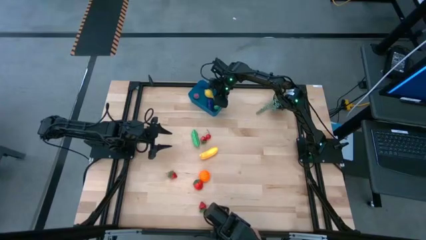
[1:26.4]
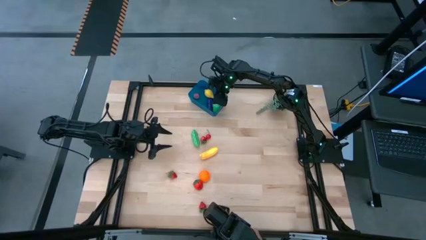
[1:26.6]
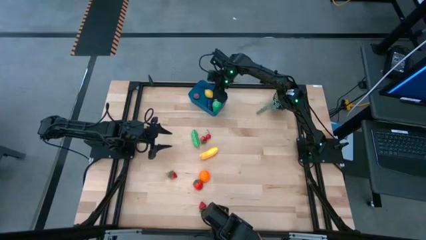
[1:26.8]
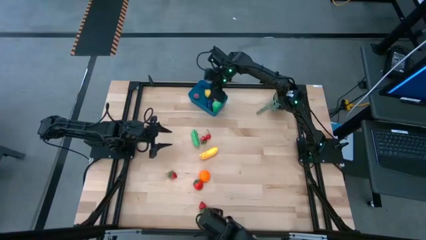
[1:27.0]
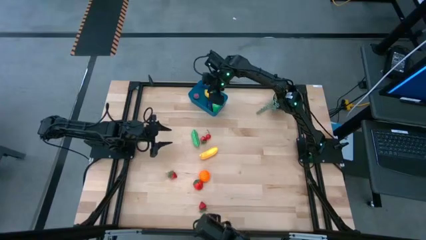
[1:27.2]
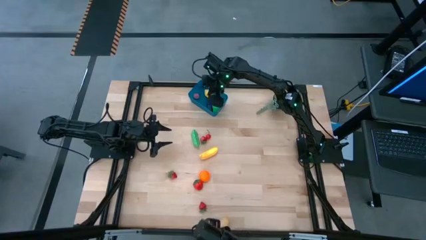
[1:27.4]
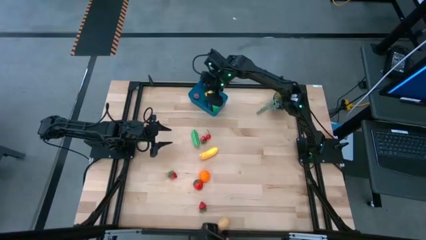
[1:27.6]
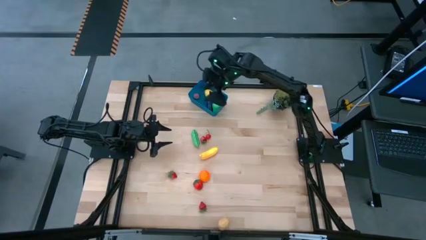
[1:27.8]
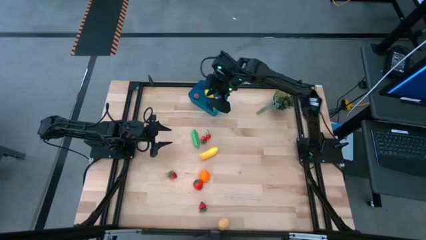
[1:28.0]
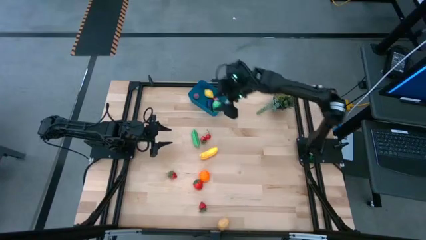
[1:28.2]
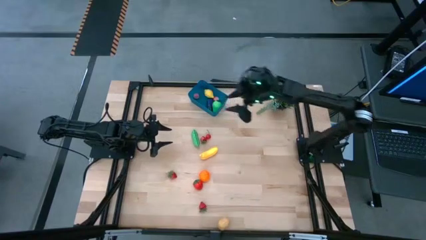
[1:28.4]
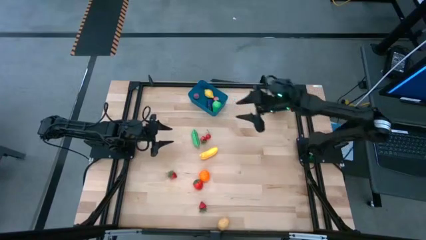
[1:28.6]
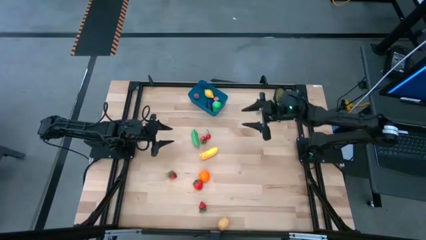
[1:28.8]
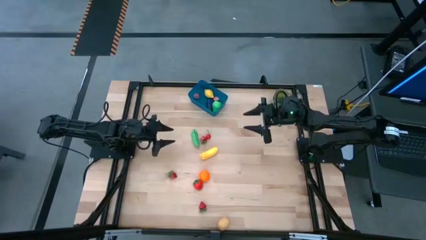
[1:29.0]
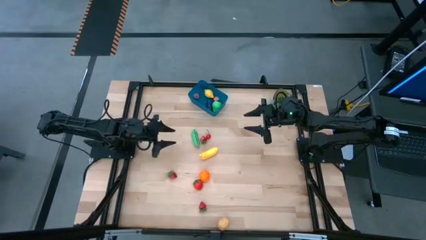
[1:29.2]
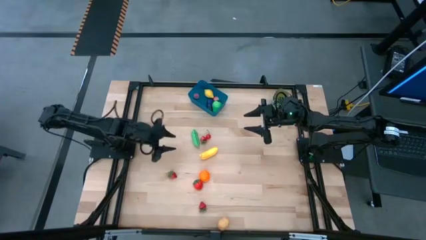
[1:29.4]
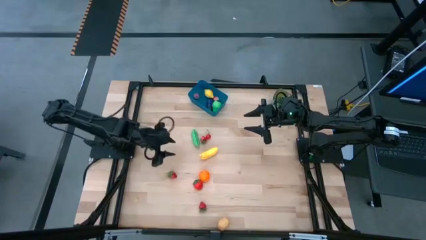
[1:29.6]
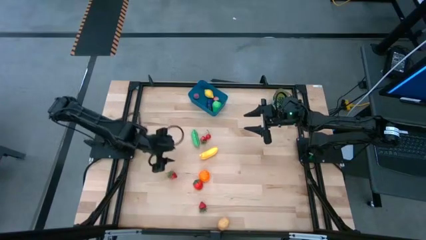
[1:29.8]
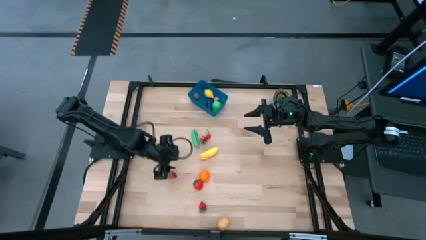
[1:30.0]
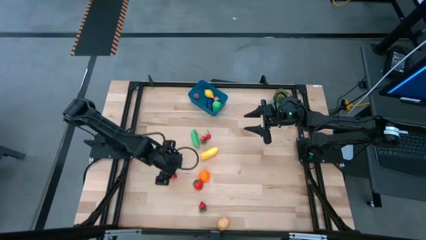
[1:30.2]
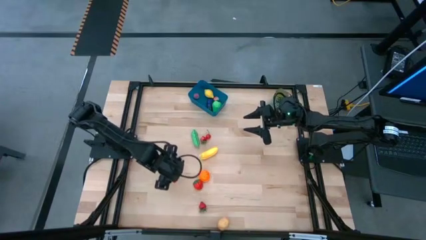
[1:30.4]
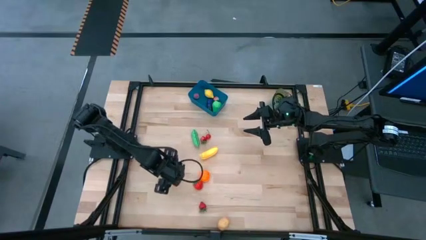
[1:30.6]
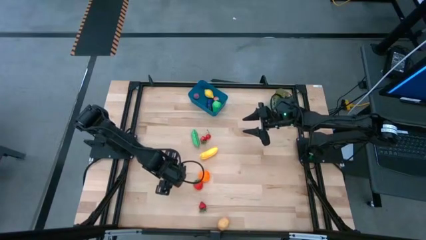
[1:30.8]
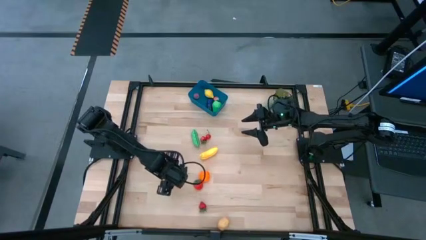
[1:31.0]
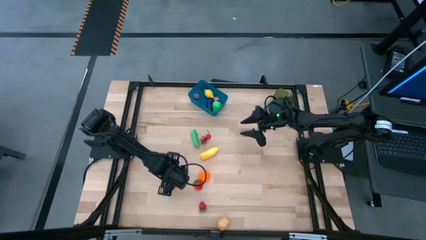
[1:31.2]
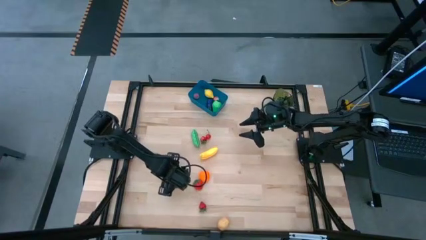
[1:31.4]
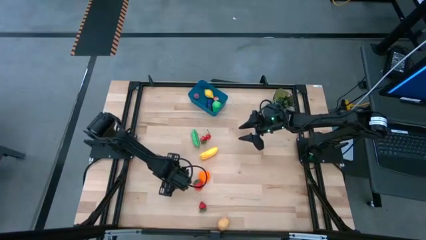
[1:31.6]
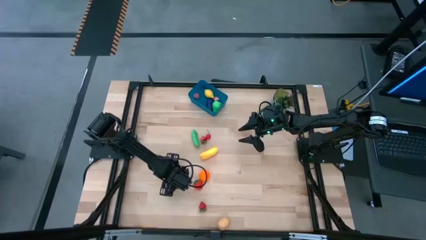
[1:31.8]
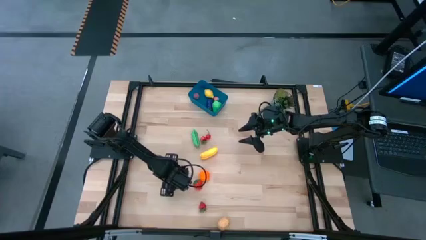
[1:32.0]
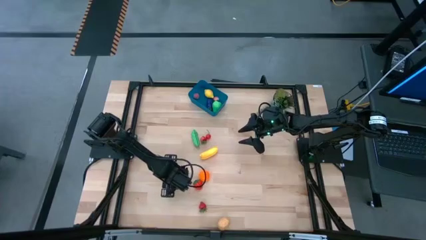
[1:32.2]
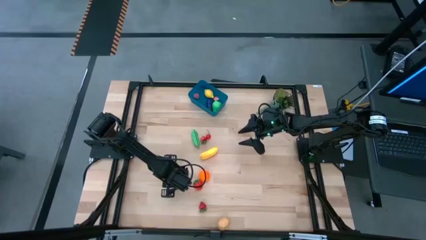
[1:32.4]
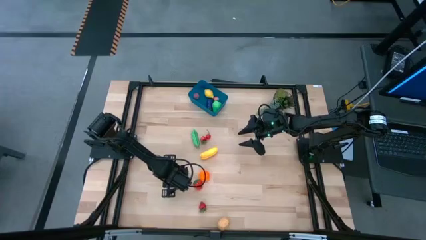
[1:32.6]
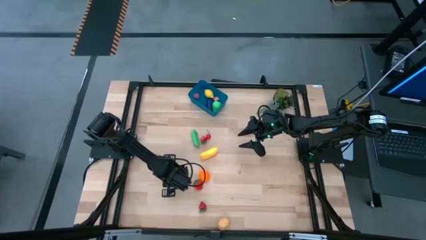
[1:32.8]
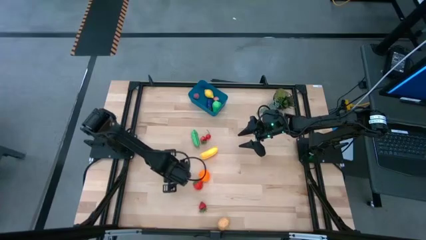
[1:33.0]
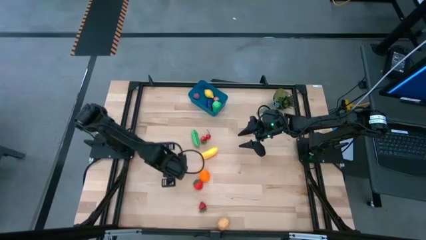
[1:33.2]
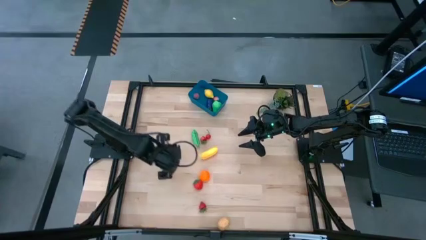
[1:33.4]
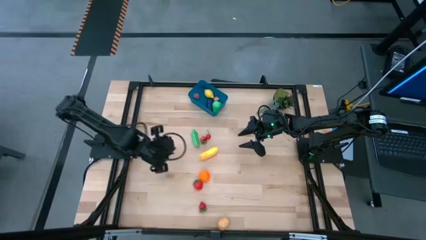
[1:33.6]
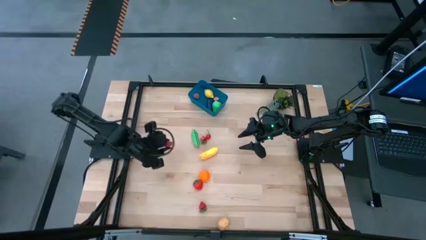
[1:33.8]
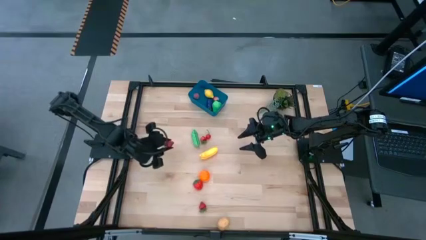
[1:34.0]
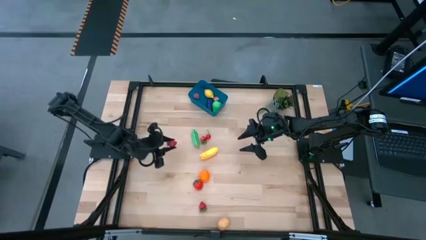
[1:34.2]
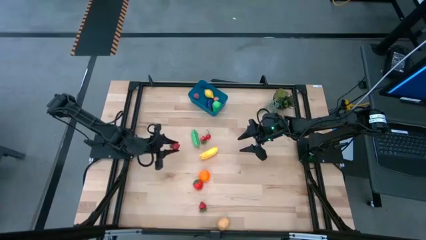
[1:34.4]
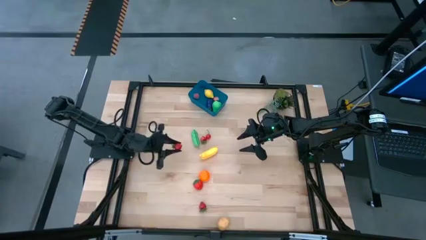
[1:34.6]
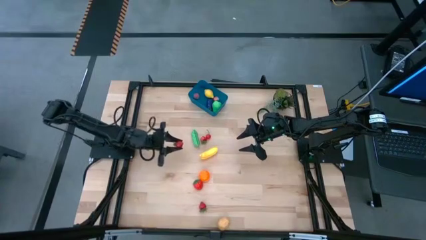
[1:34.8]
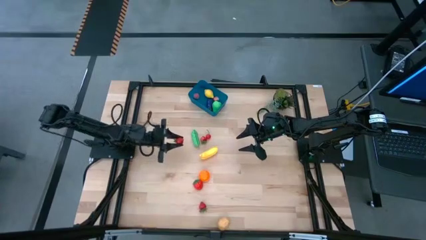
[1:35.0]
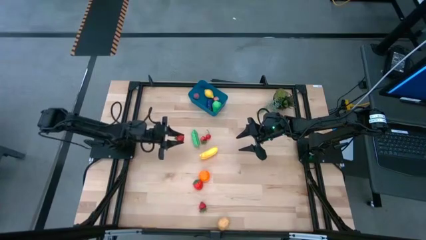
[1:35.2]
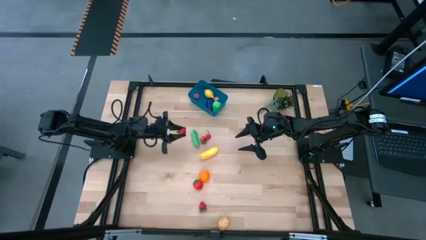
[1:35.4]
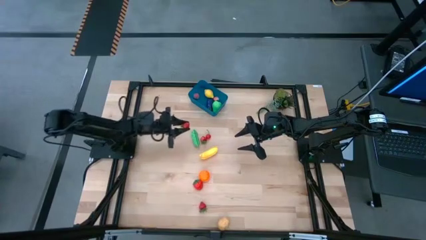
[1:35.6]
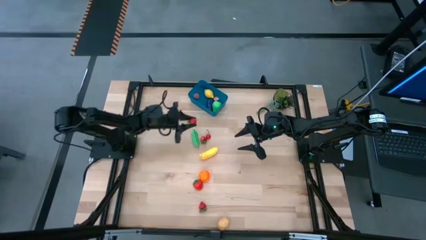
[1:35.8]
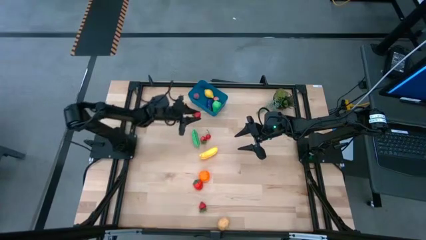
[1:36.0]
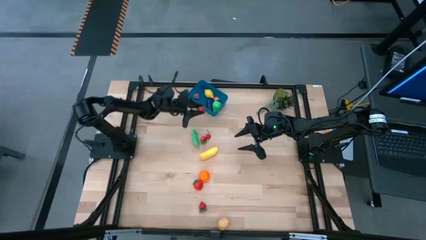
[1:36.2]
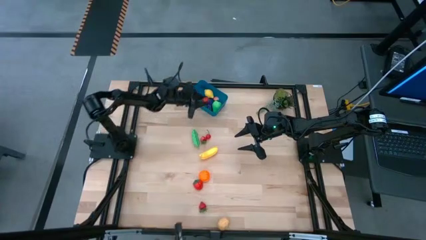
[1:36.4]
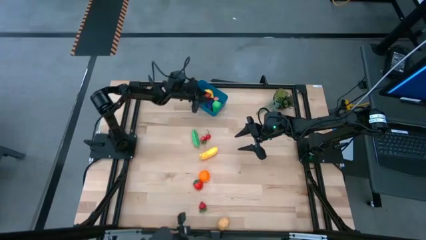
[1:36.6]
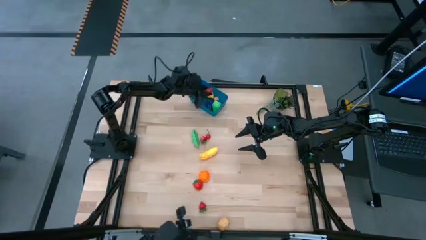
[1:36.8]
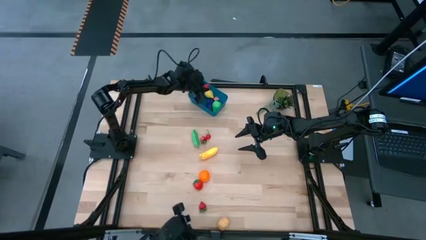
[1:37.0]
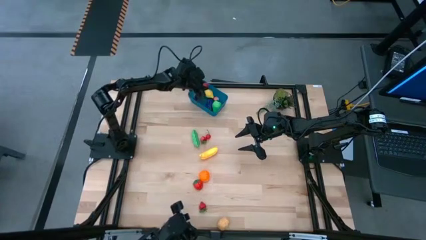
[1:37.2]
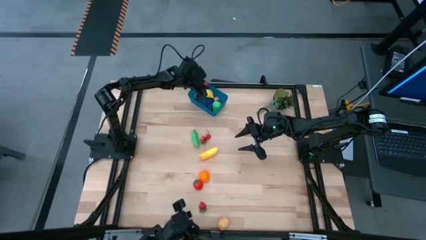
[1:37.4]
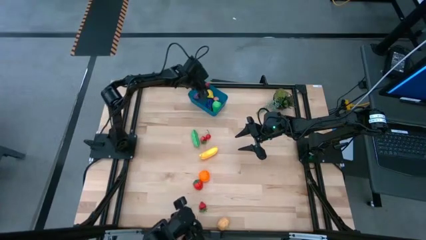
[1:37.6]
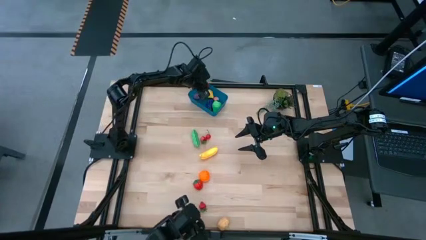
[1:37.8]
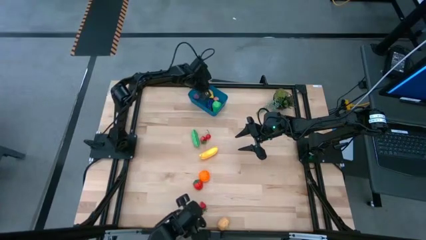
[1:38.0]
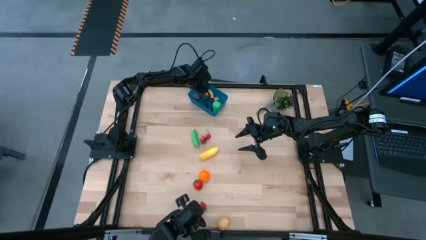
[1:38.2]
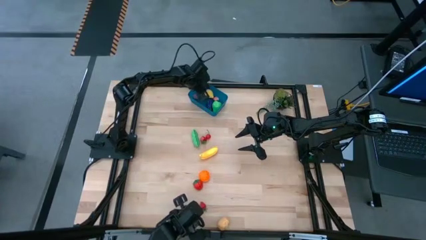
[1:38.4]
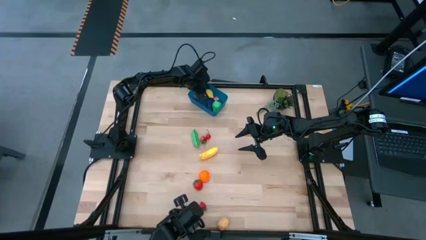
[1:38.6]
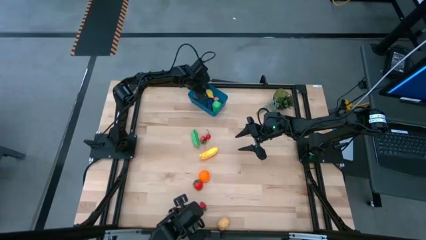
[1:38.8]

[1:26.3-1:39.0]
Task: Pick and placing Produce into tupperware
Put the red strawberry into the blue bin

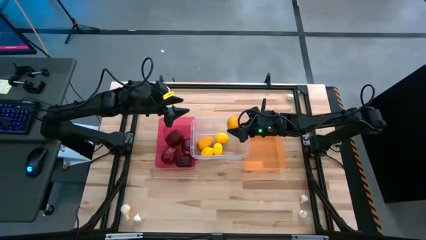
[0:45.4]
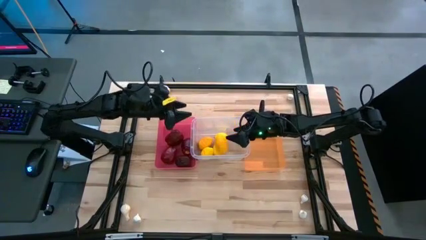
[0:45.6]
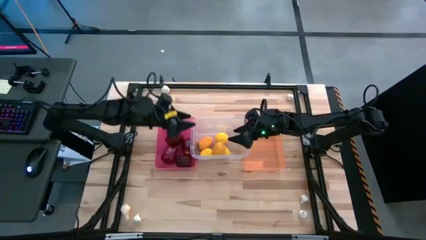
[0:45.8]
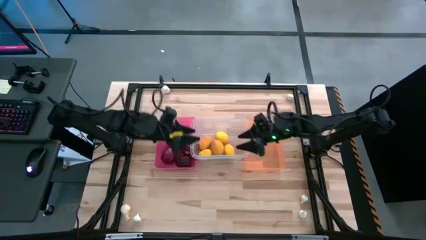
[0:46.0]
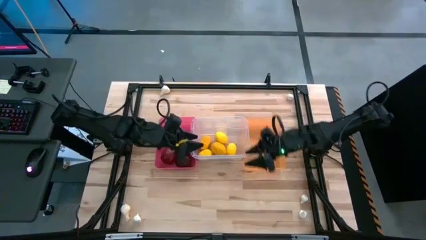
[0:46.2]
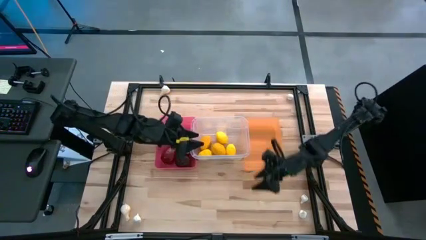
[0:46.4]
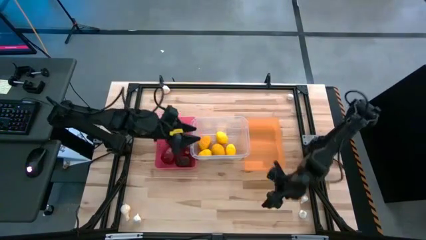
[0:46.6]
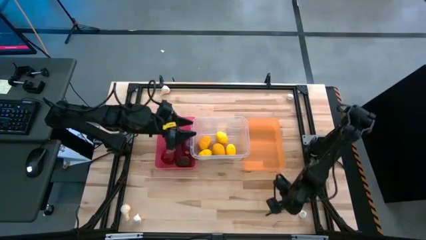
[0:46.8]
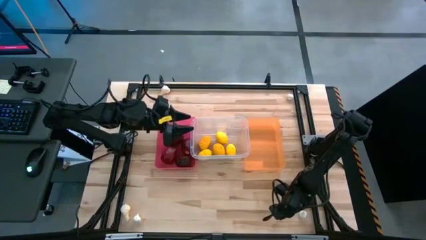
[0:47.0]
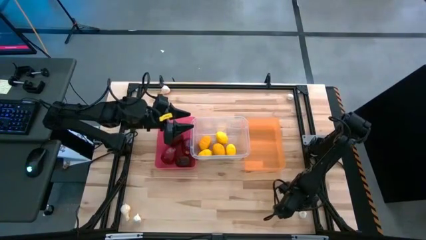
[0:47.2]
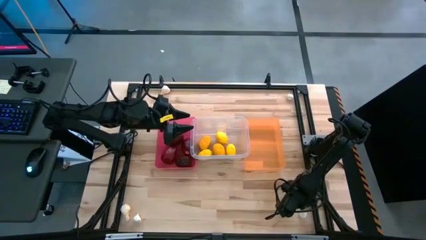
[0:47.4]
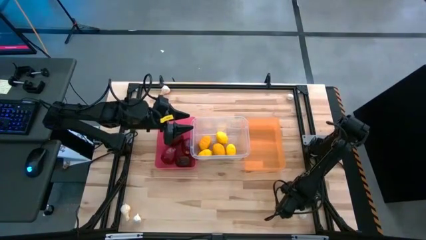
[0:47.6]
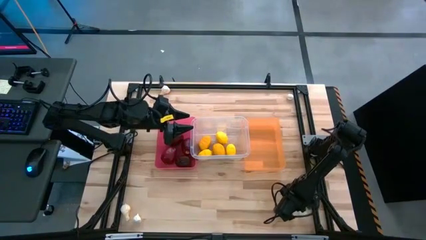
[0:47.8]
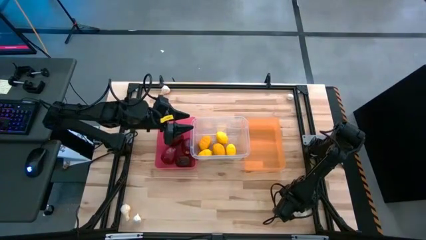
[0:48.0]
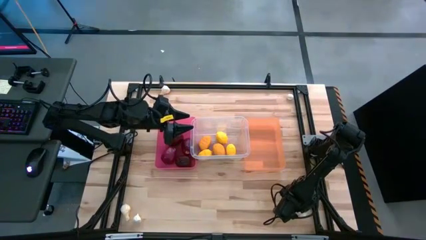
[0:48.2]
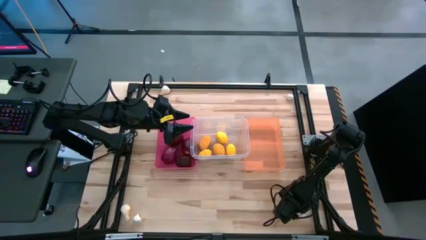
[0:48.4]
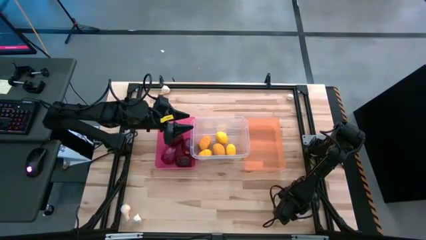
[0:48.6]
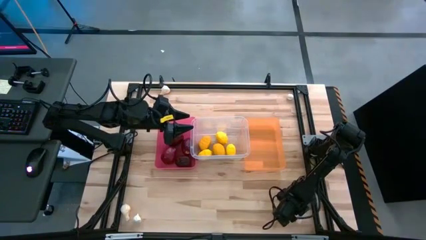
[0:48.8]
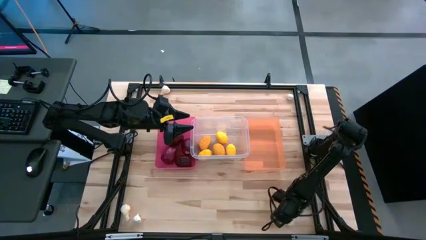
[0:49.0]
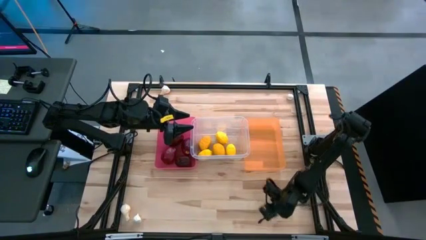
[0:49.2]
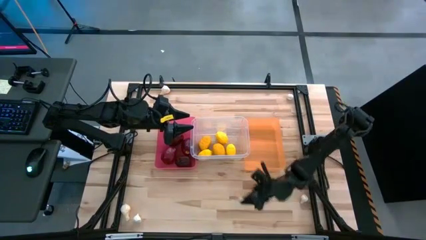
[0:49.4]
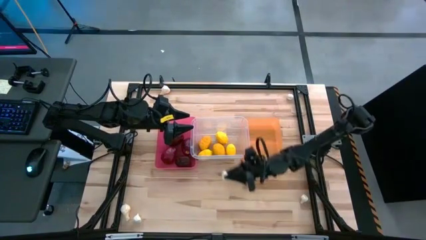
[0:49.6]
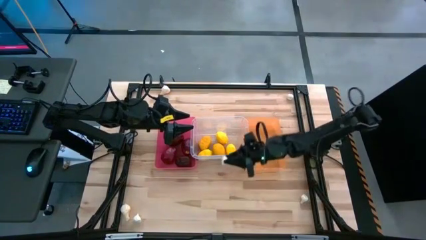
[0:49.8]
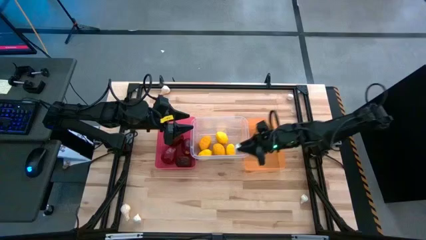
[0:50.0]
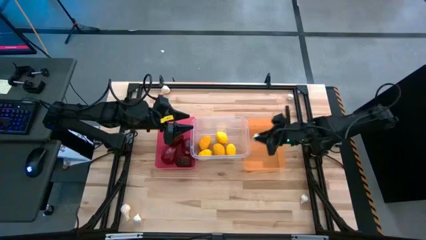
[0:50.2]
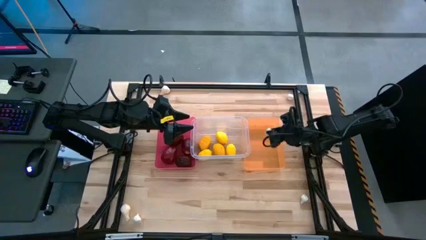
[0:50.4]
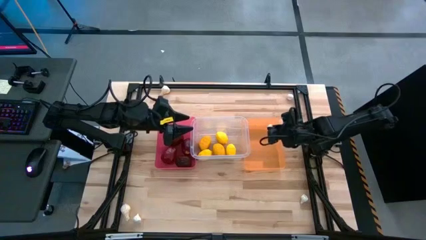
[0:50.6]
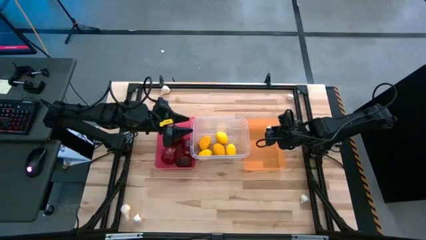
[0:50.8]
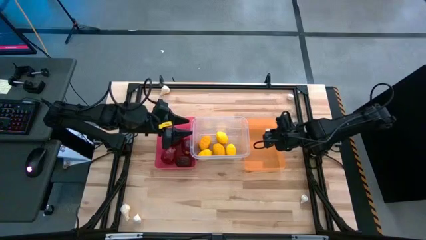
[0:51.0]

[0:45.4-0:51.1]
Task: Sort produce into baskets
Put the white garlic into the orange bin
